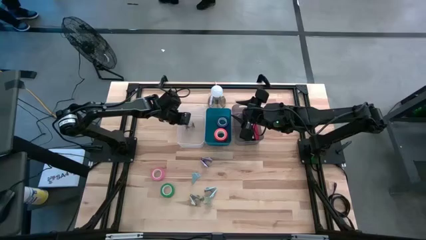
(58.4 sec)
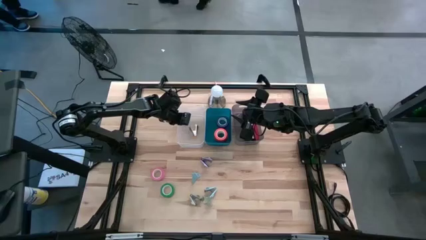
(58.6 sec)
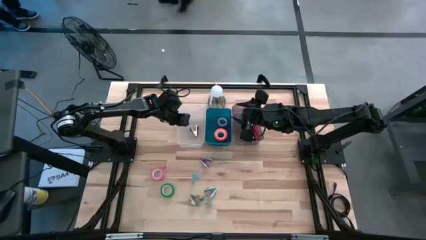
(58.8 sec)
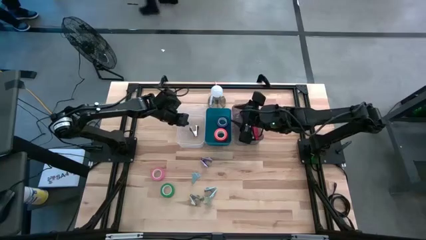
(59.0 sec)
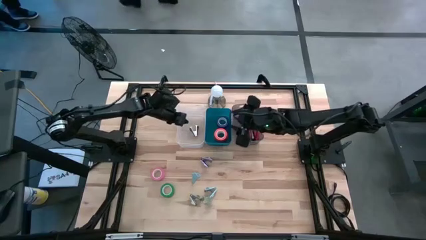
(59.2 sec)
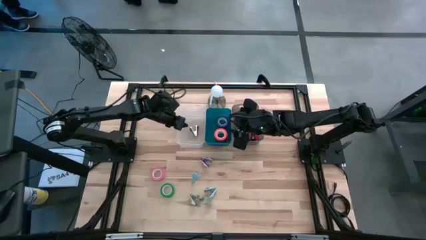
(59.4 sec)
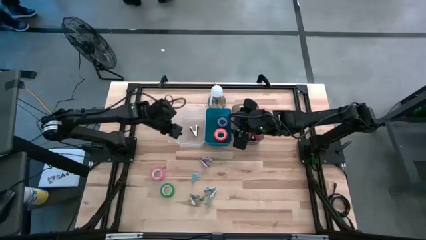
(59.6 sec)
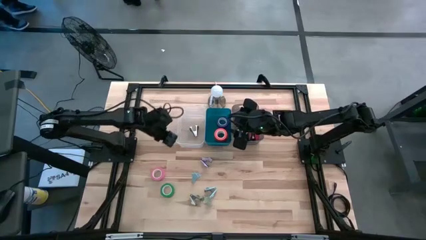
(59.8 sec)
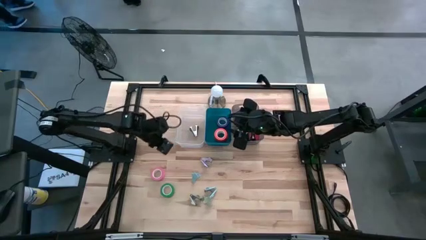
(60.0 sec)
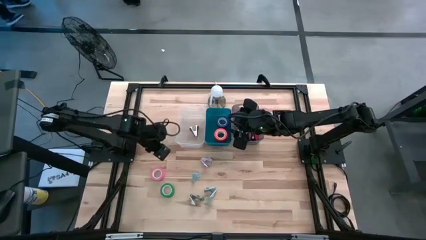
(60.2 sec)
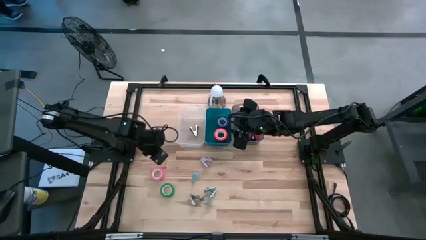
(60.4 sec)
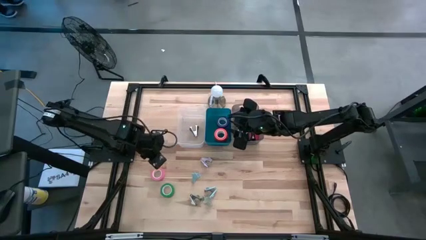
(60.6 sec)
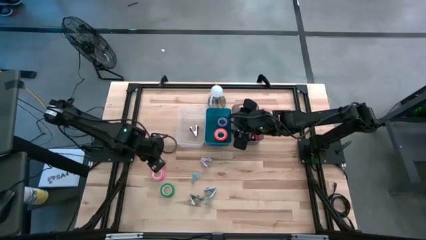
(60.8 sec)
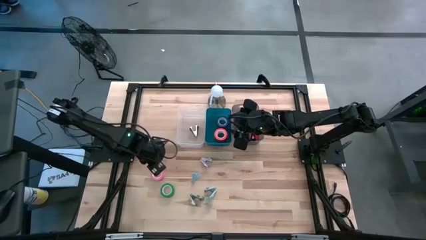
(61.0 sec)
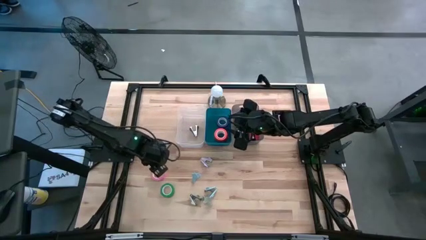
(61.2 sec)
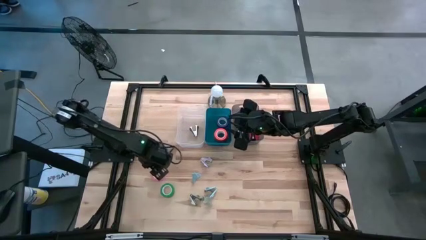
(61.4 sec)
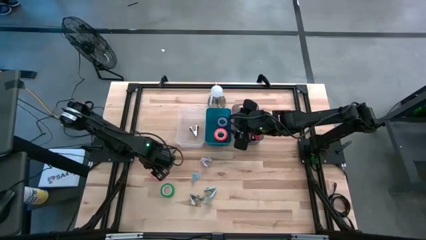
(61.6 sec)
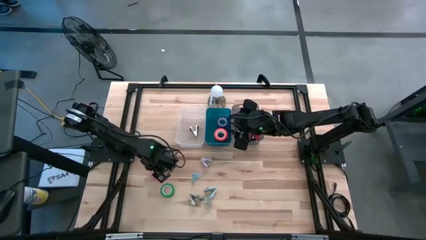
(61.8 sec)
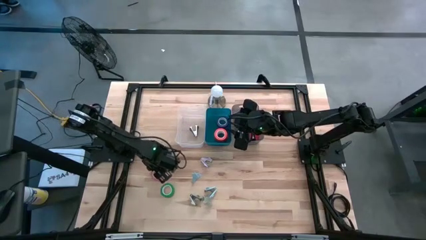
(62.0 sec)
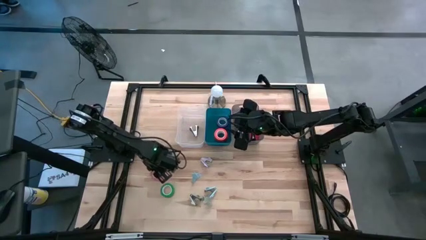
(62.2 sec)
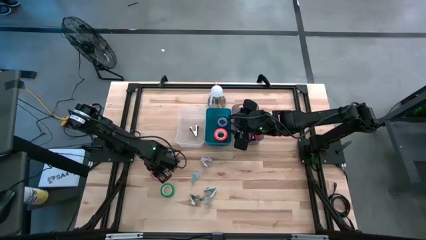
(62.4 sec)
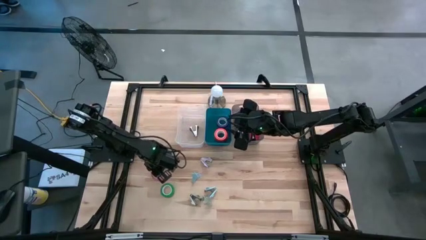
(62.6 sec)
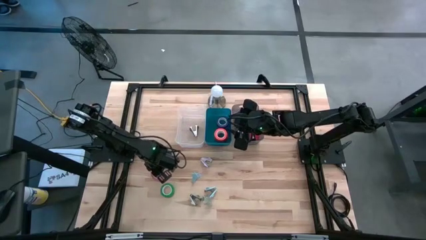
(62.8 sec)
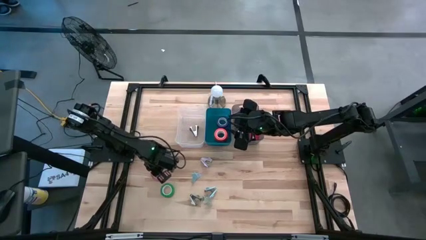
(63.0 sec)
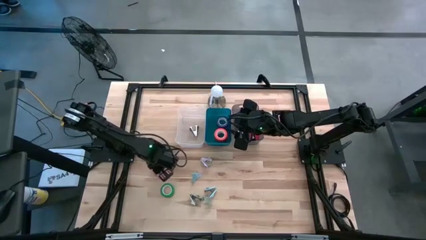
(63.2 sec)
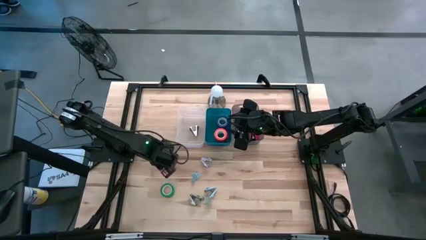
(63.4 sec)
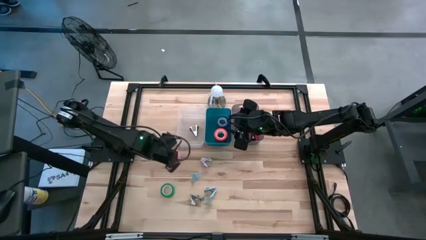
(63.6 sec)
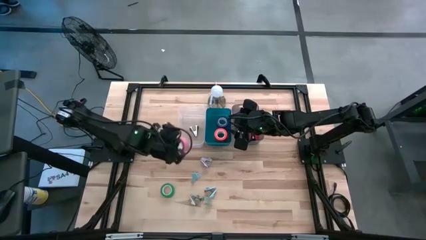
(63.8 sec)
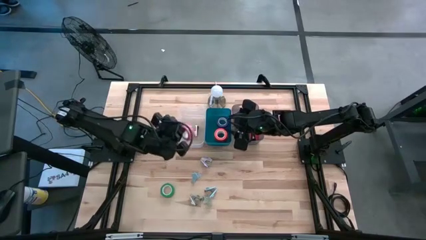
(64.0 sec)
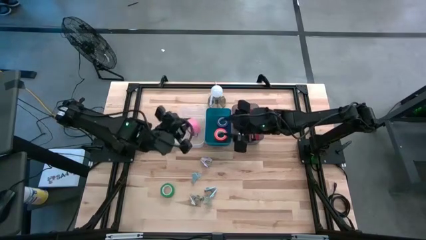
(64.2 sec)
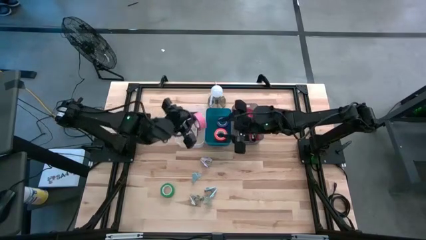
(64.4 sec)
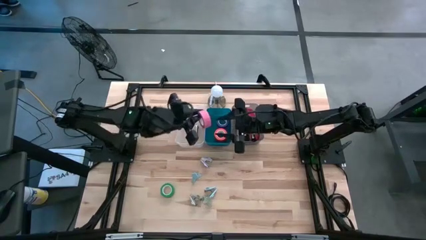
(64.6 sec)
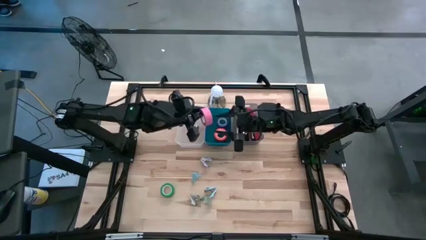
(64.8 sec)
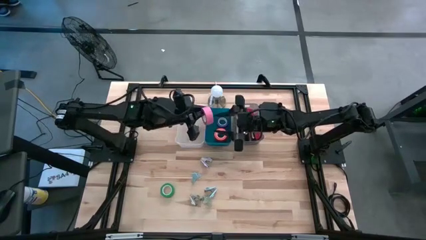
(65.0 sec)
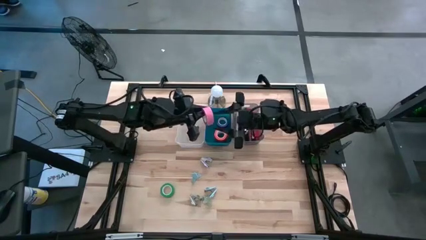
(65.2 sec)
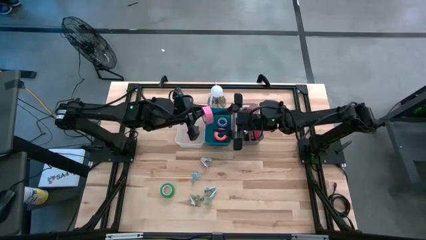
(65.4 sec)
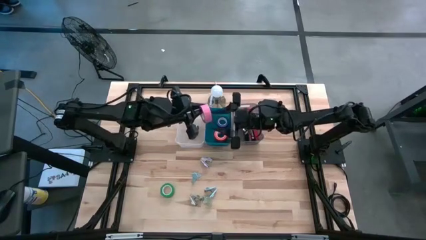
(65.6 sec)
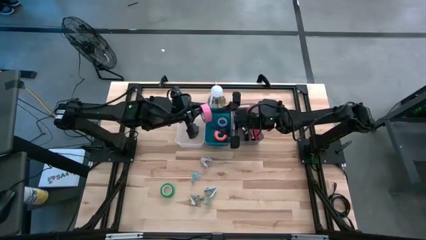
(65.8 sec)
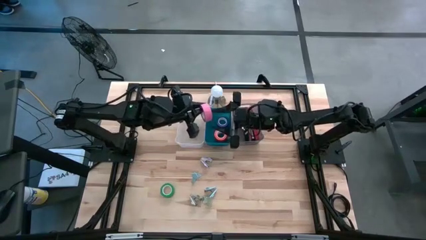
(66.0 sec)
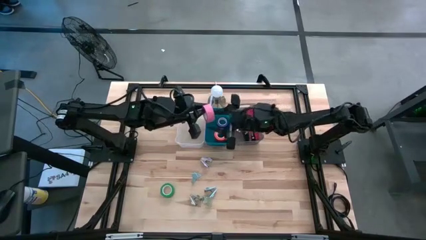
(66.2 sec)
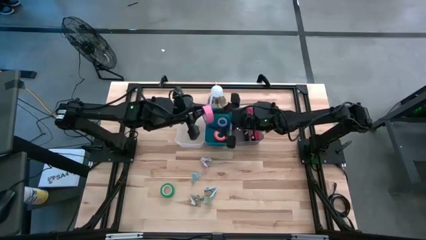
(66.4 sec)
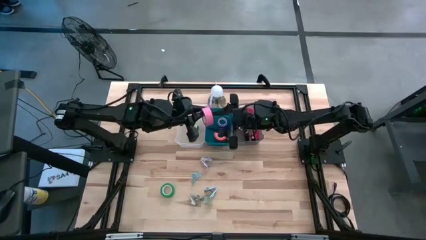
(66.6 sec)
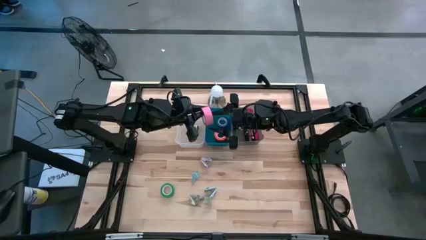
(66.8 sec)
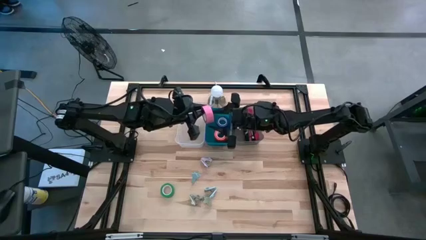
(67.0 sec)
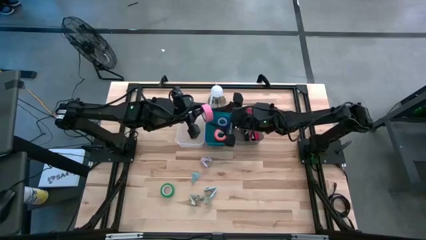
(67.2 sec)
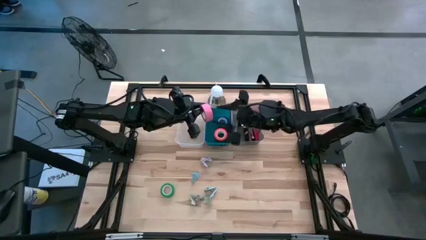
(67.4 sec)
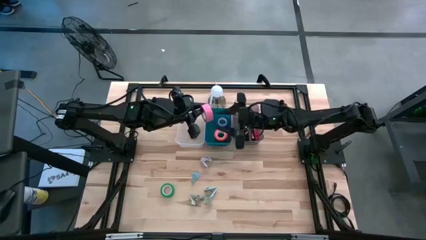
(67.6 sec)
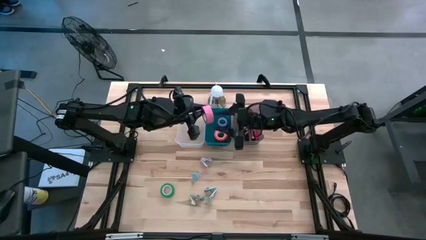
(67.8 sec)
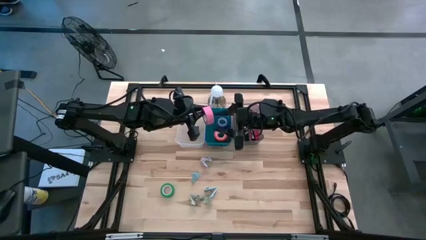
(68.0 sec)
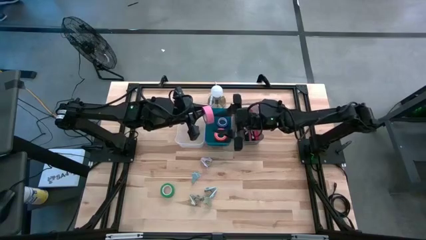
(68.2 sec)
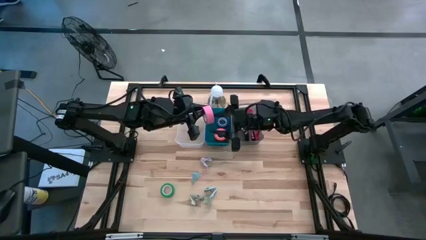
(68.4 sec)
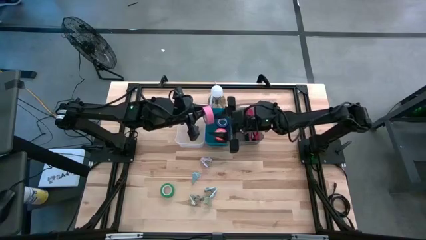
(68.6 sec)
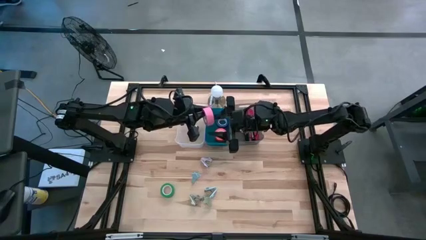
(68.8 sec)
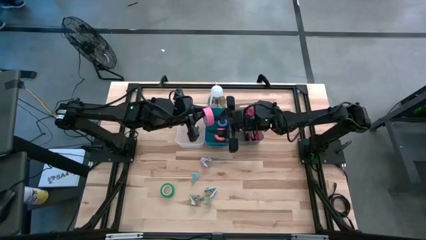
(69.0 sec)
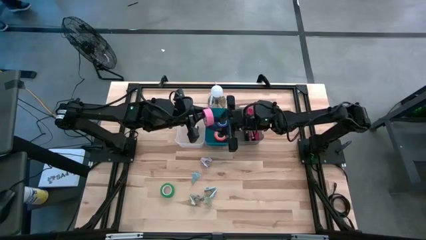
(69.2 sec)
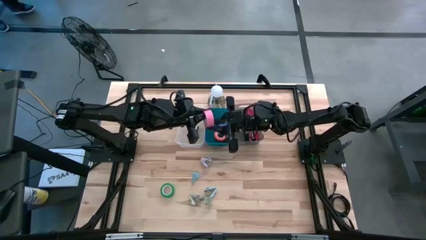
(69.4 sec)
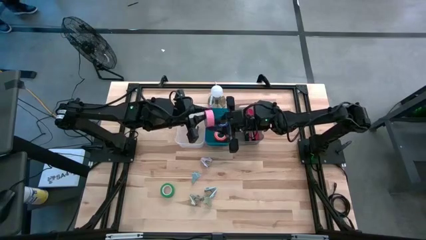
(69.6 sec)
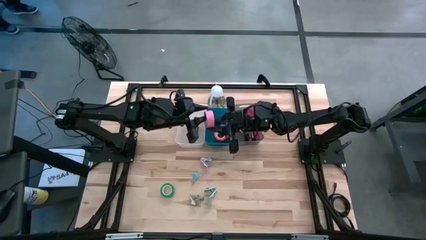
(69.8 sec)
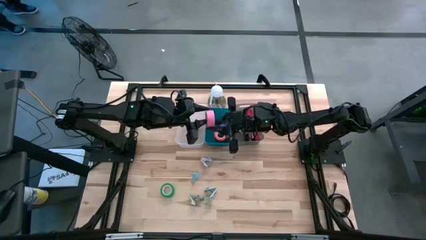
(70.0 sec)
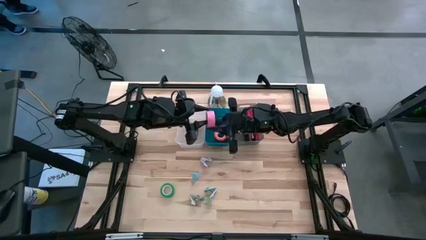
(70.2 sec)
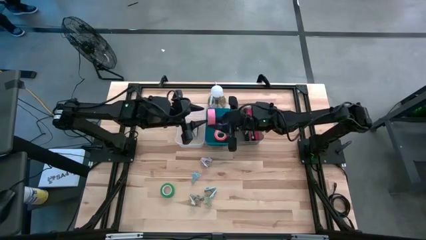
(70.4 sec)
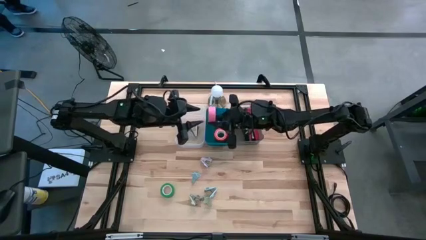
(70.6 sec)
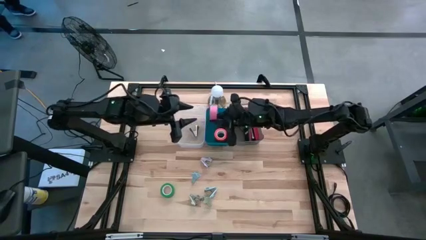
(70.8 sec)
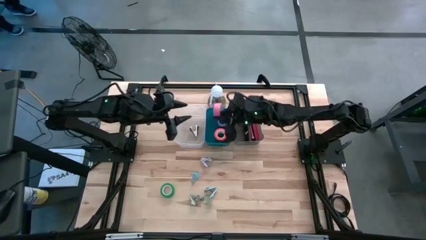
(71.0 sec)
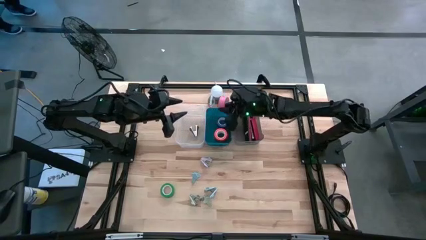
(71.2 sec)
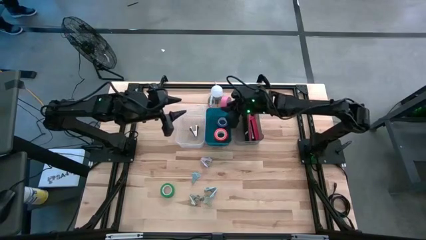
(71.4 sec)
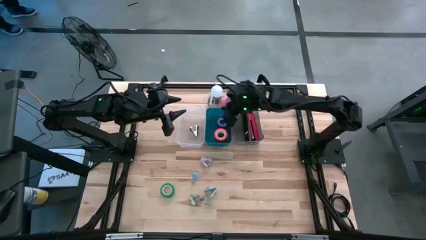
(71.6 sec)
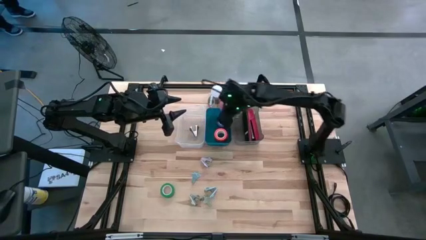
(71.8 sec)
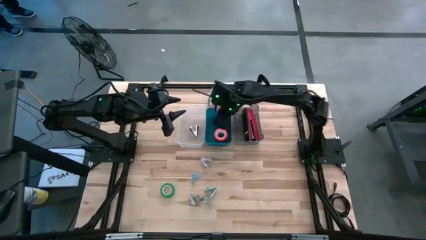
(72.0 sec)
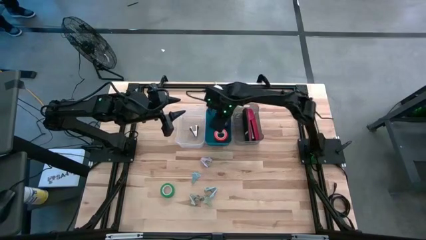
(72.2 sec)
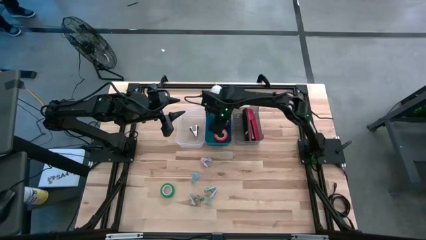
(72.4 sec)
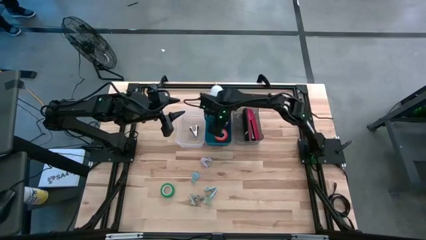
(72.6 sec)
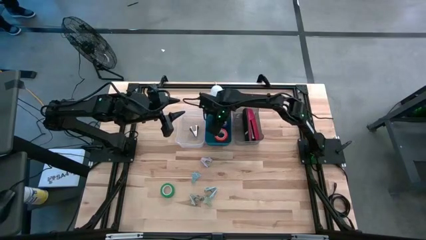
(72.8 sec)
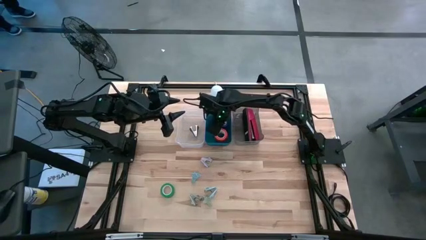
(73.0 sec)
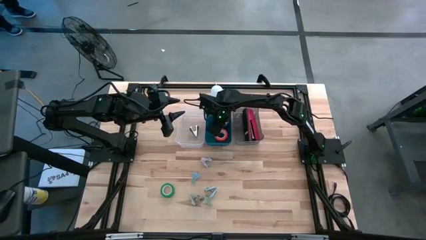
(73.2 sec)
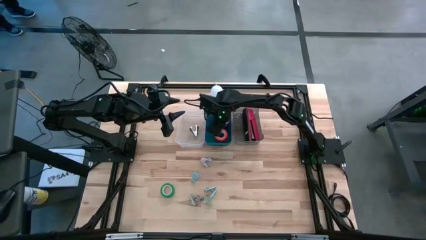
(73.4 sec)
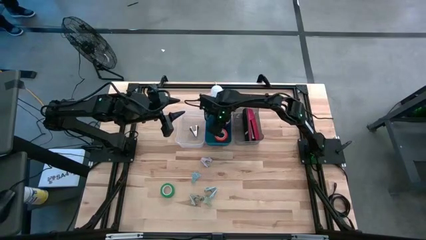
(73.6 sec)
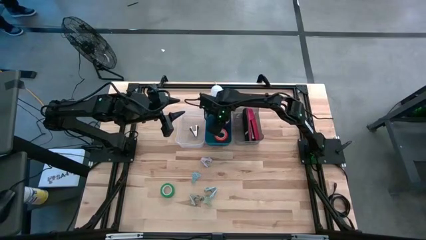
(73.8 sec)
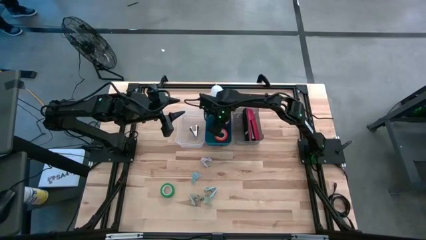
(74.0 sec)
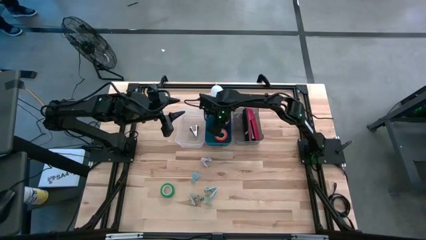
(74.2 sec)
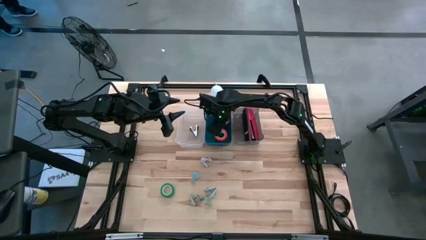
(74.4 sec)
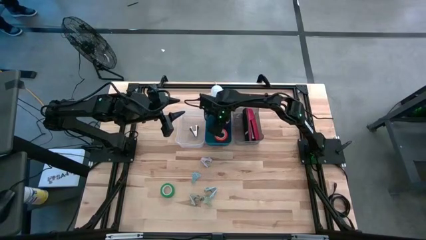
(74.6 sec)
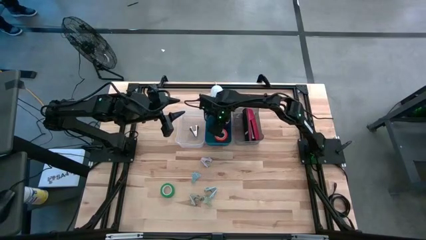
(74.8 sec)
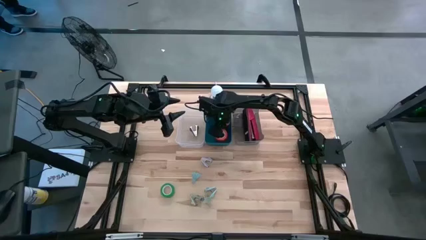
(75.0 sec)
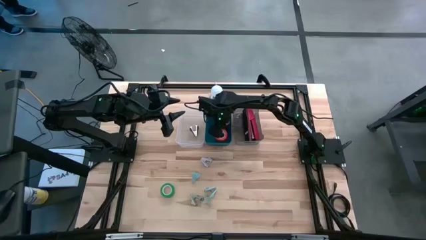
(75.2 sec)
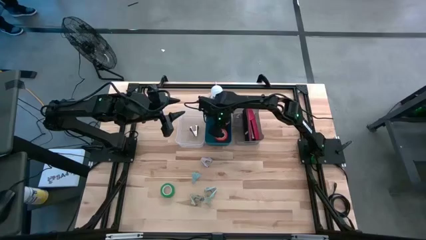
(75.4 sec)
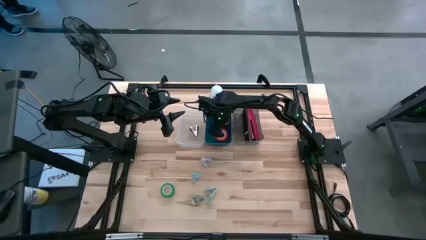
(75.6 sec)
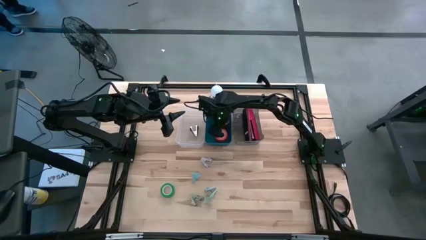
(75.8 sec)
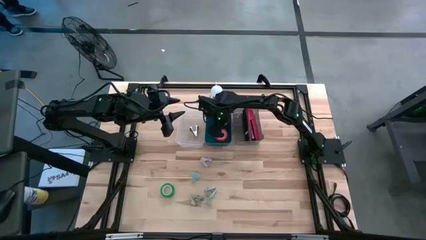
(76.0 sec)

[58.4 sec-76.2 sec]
Task: Pick and place Stapler, Stapler remover, tape
Put the pink tape into the blue bin
